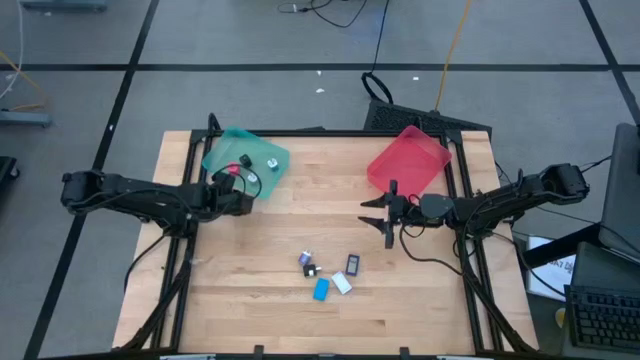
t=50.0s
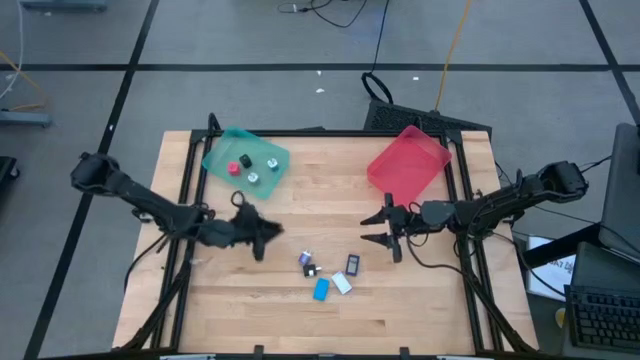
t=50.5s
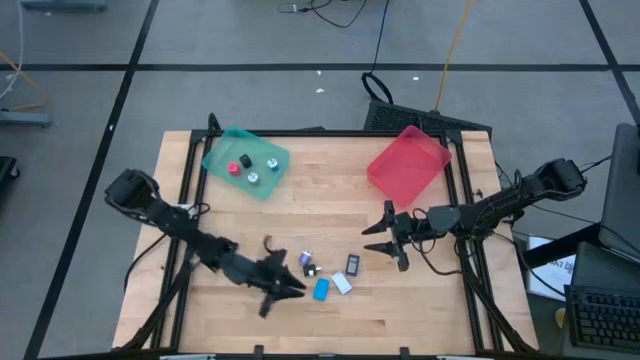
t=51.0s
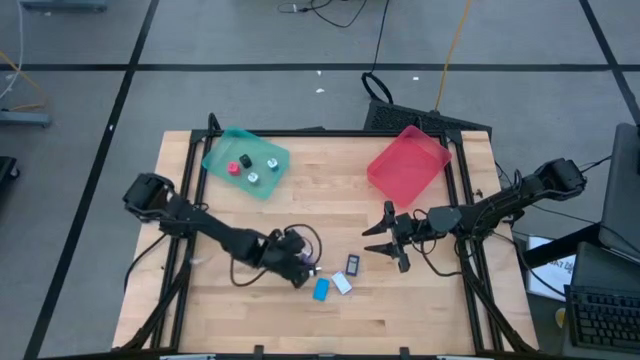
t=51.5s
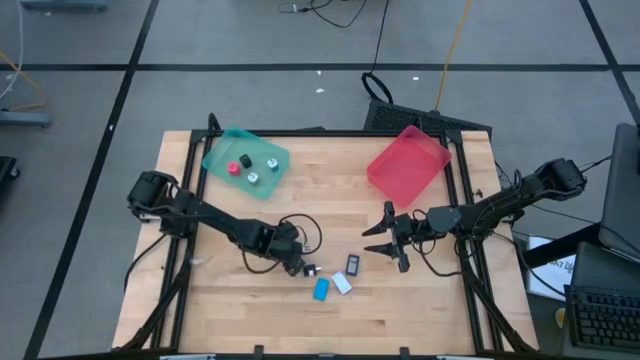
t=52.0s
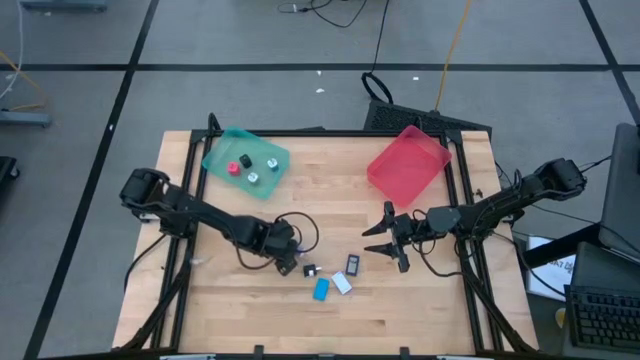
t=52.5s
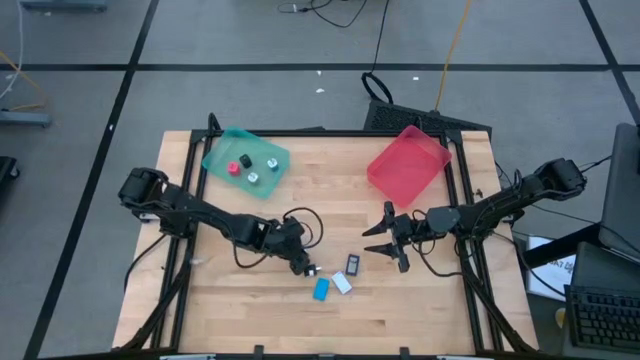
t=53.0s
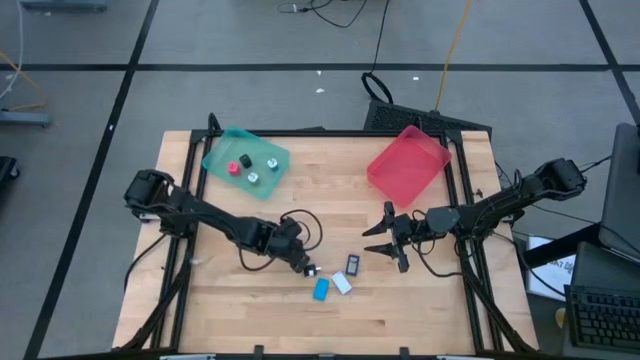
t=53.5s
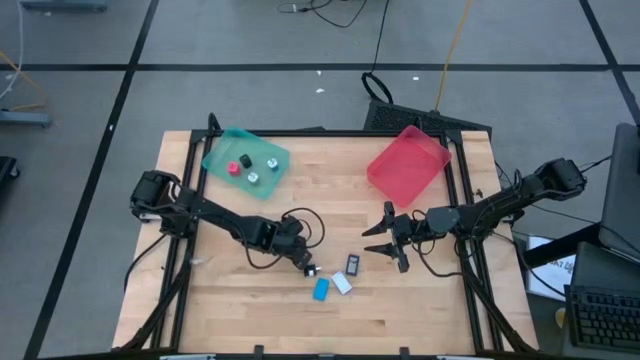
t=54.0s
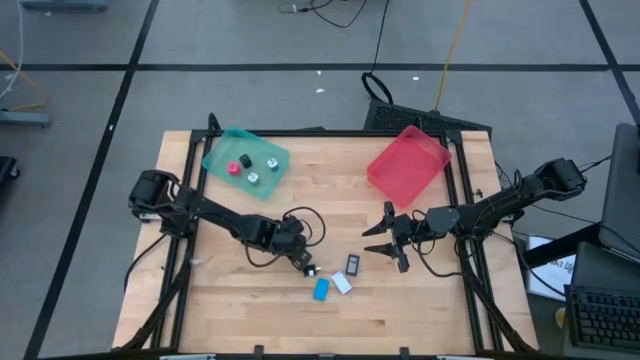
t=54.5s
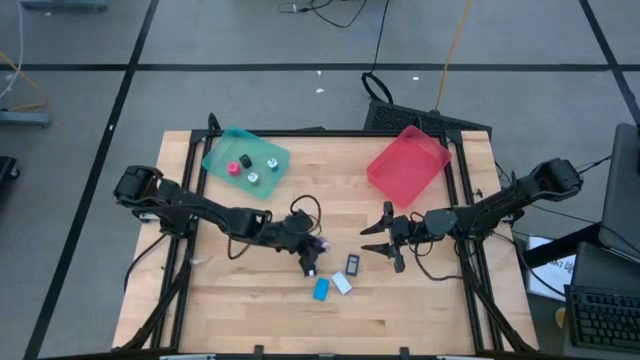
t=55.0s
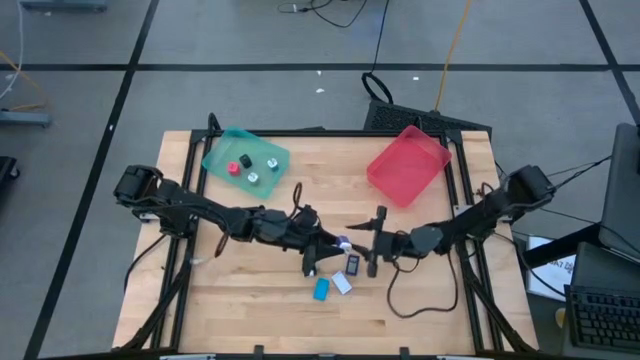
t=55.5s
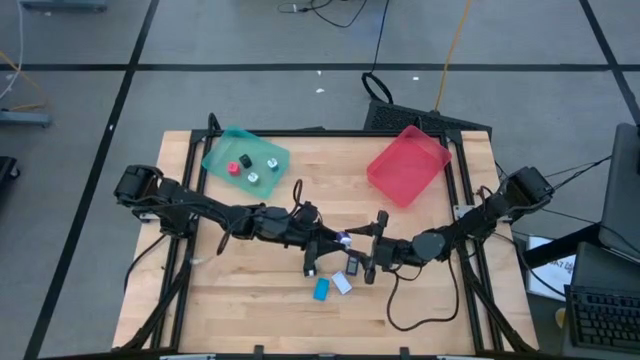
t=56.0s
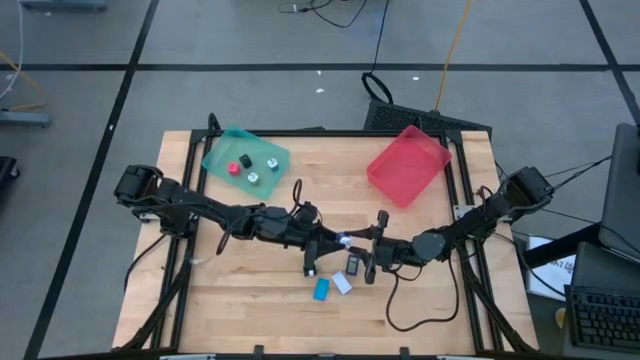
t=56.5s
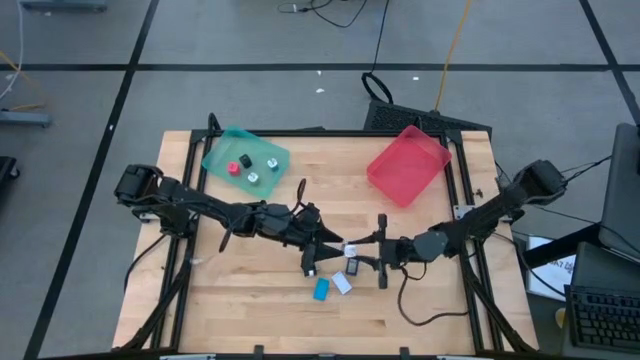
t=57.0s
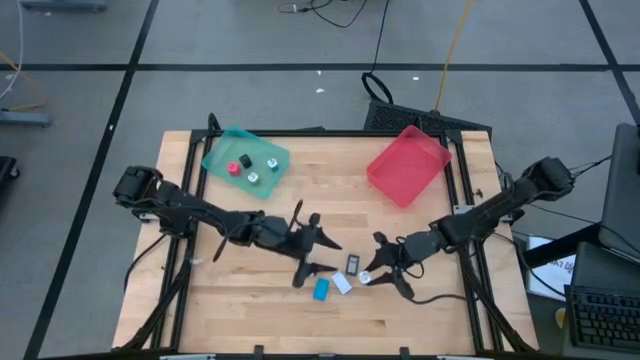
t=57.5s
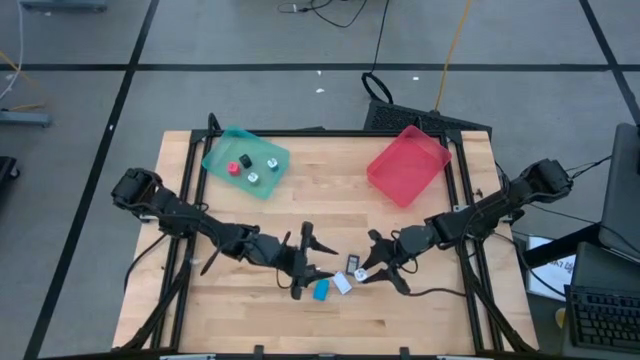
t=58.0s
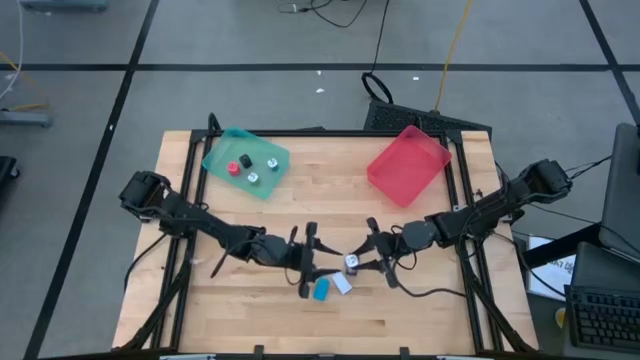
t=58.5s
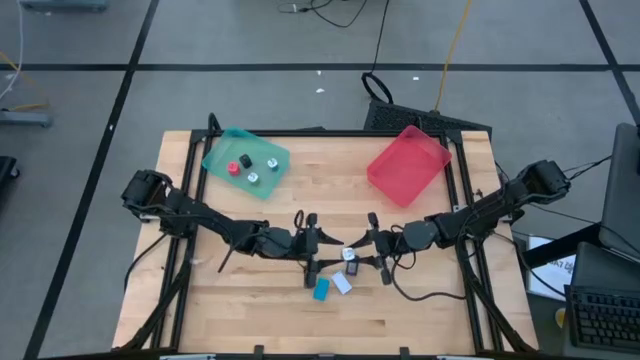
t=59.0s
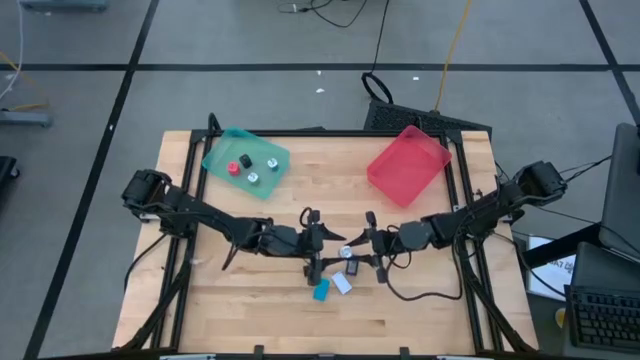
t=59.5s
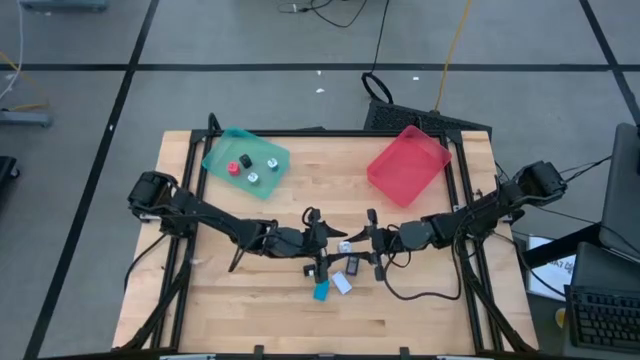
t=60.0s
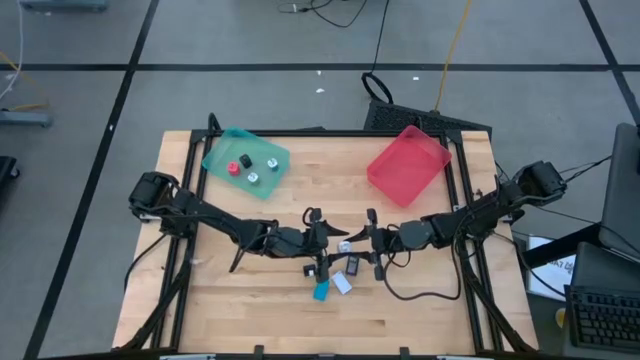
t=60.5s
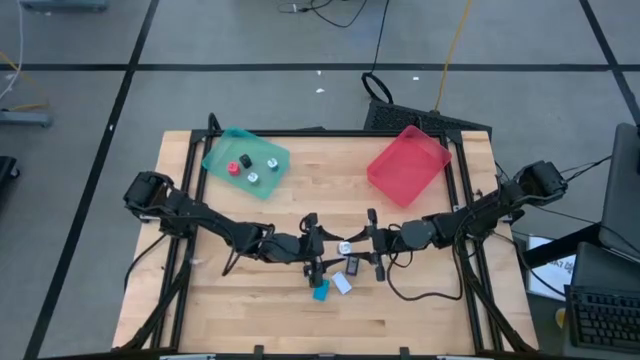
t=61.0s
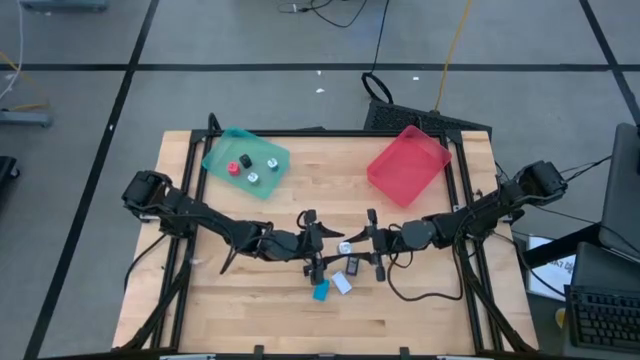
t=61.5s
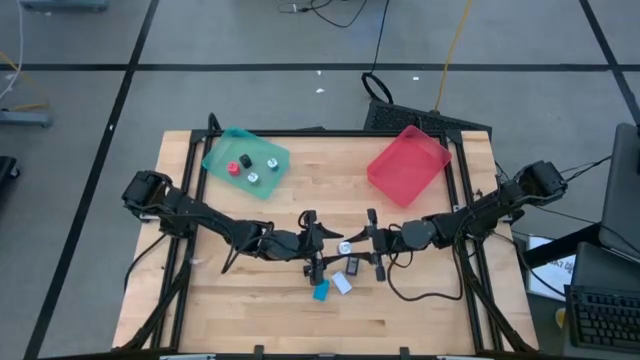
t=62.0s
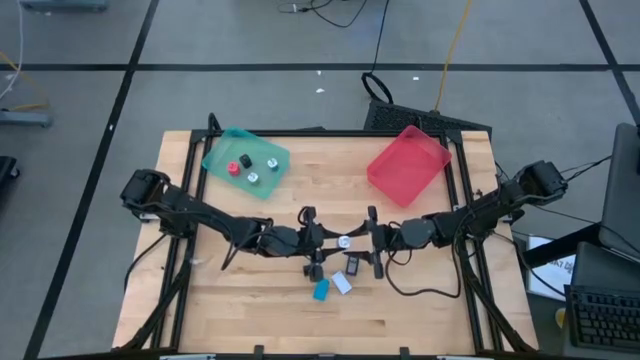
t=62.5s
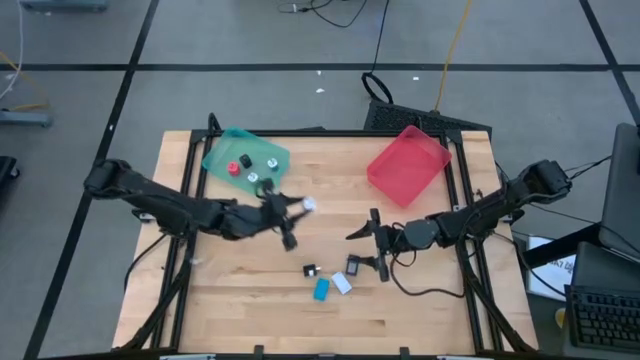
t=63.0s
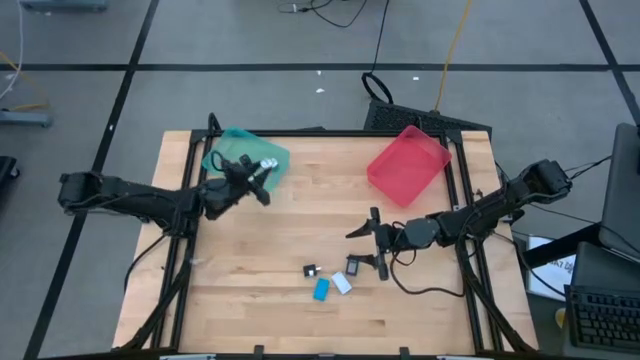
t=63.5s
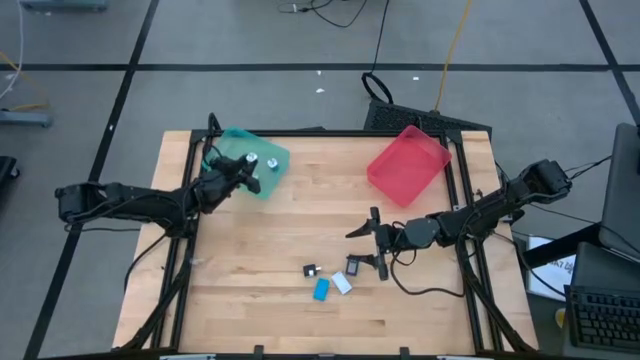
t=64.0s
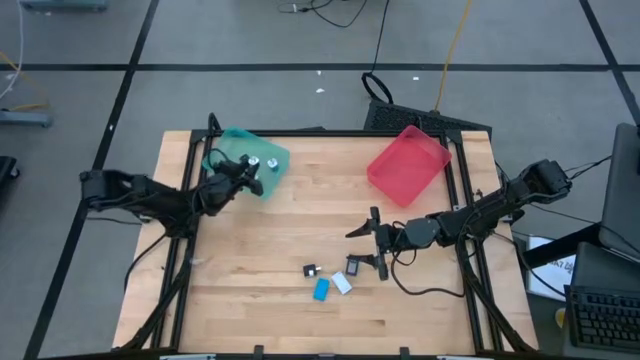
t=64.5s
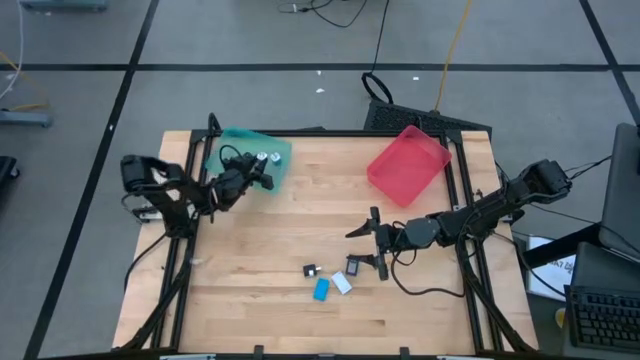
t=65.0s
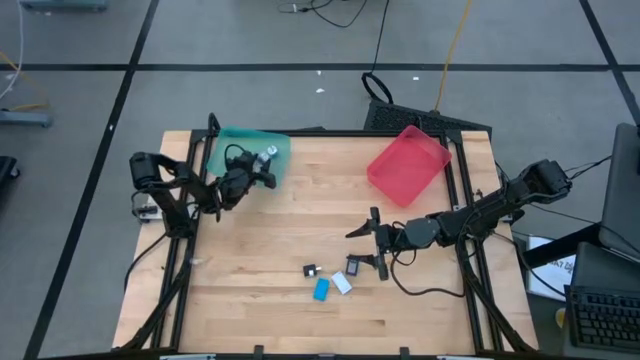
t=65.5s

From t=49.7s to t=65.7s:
Task: Pick & Place Office items
Put the purple charger adapter into the blue bin

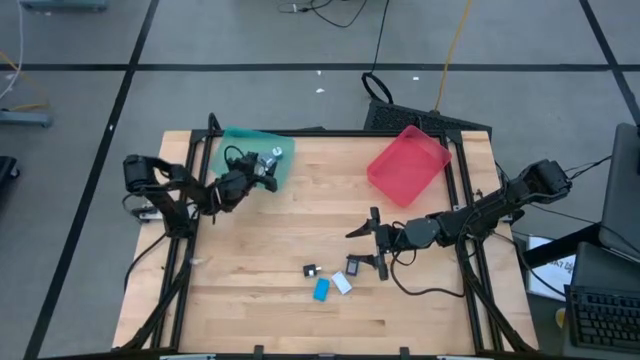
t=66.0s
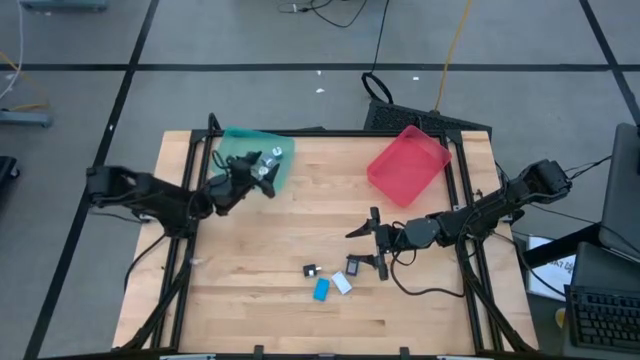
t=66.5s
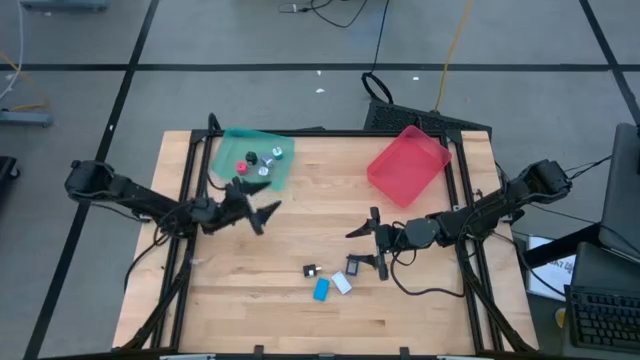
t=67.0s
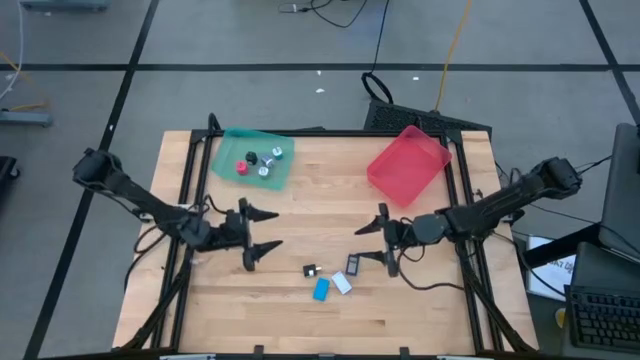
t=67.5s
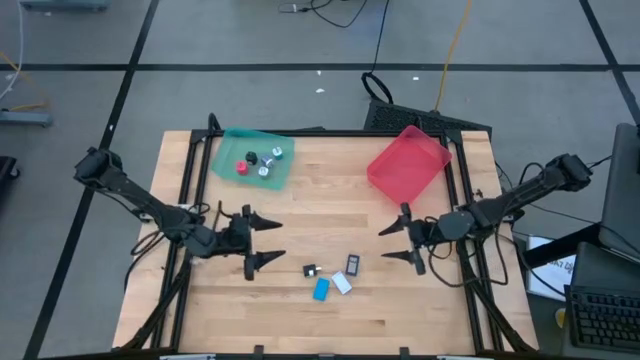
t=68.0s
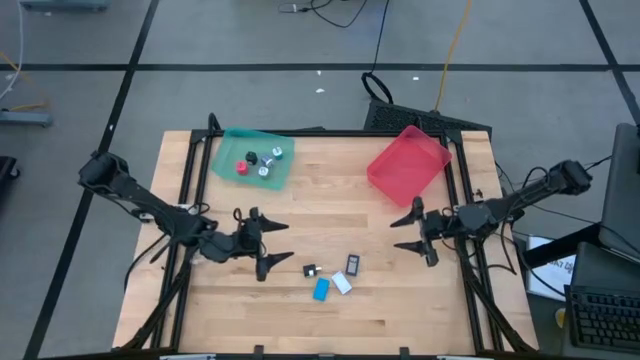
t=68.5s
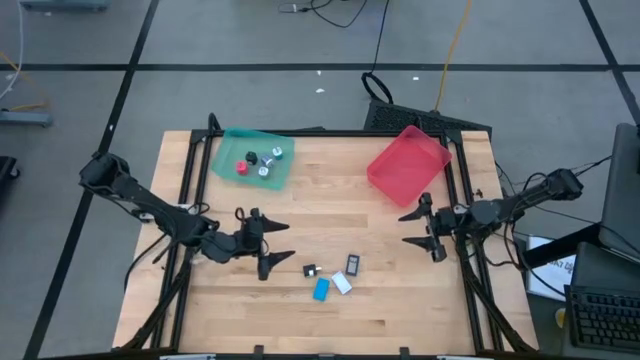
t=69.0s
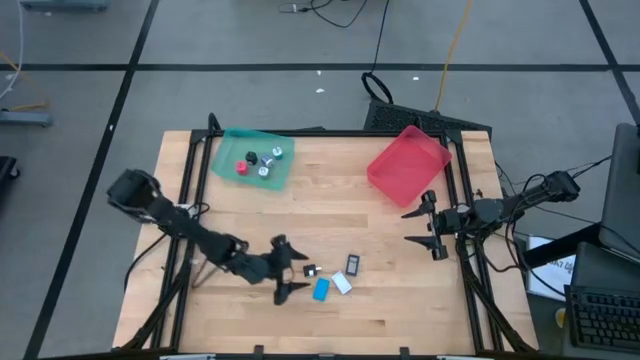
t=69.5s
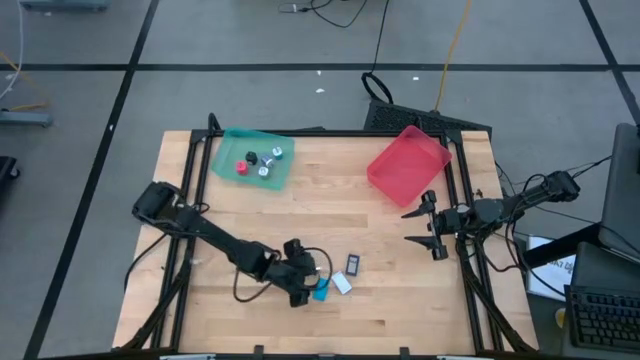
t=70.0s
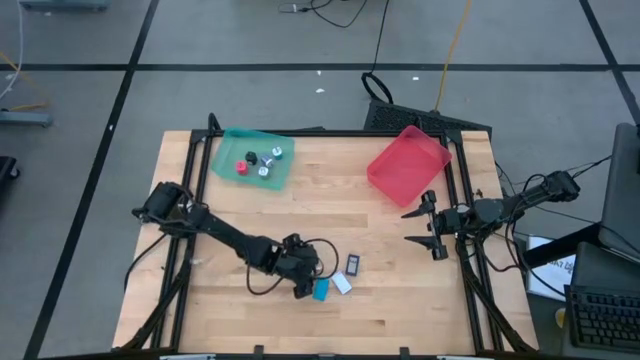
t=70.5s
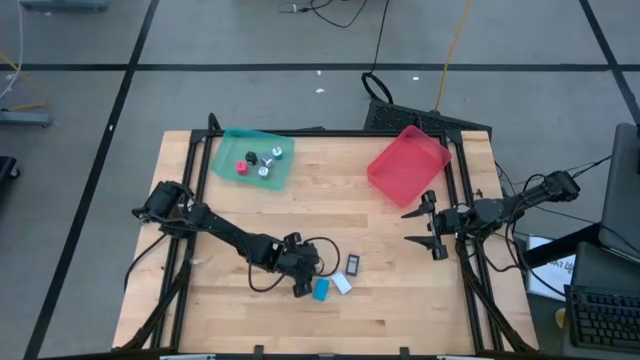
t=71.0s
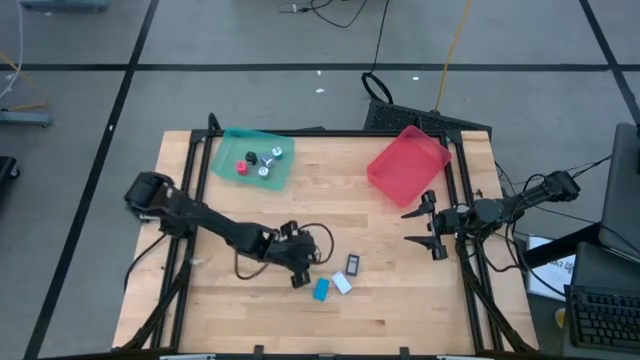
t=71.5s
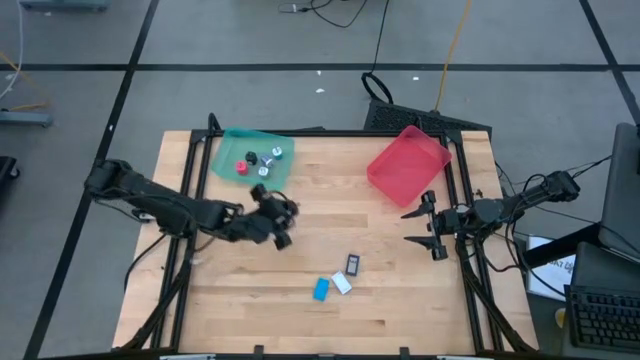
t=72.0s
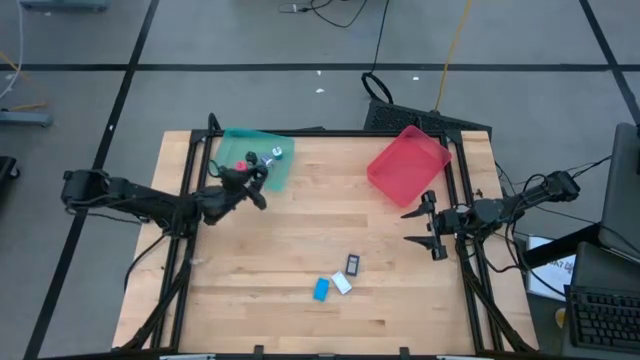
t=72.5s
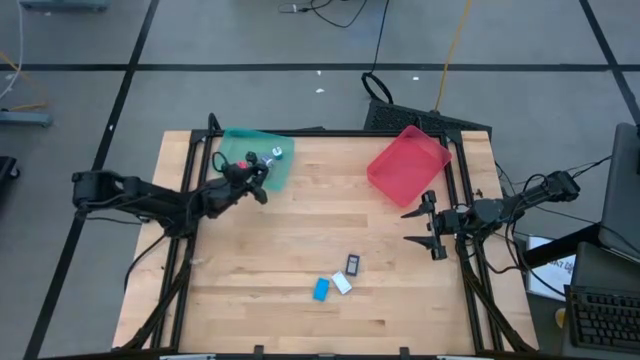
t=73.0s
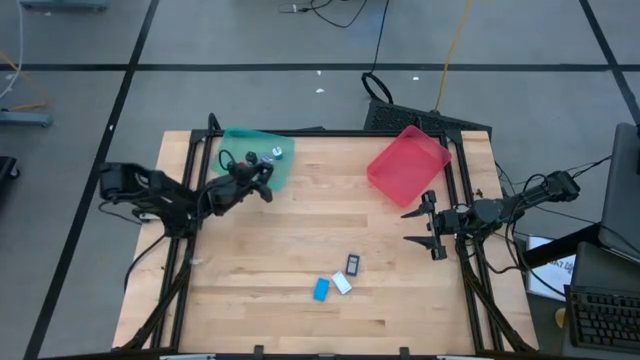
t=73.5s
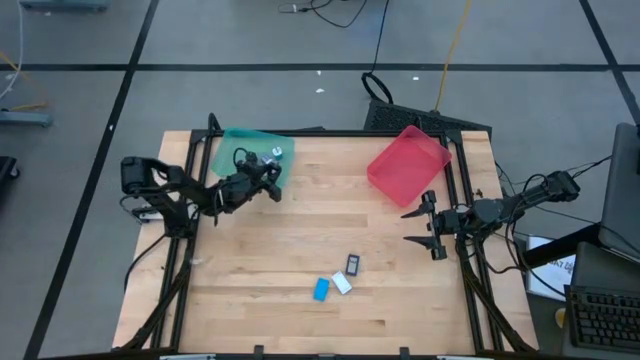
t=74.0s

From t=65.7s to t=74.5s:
Put the black charger adapter into the blue bin
